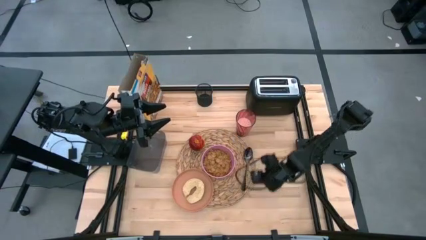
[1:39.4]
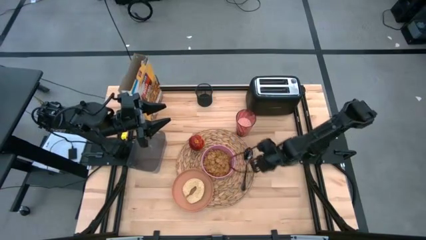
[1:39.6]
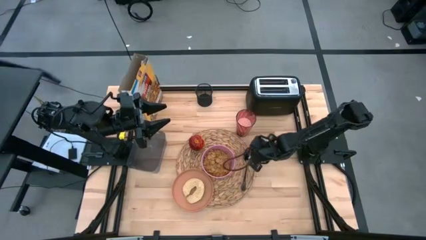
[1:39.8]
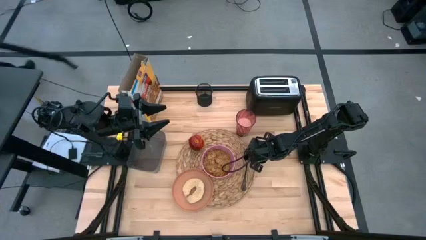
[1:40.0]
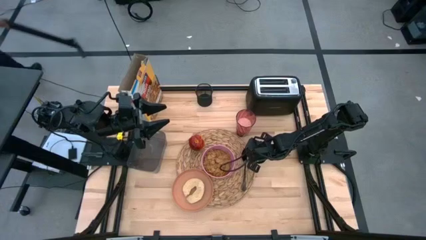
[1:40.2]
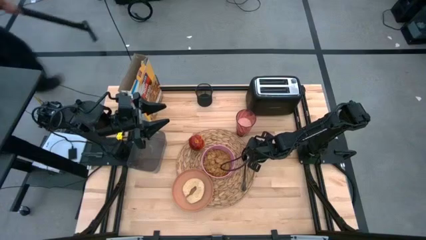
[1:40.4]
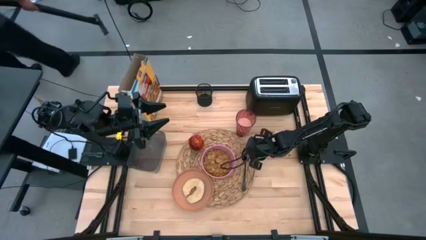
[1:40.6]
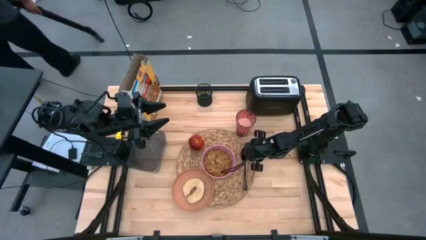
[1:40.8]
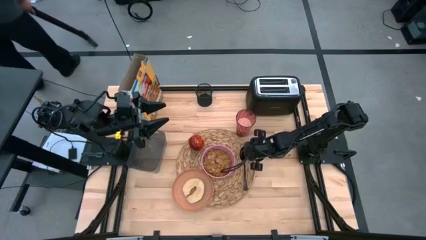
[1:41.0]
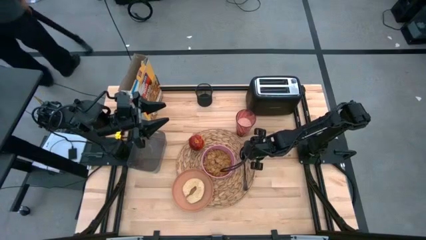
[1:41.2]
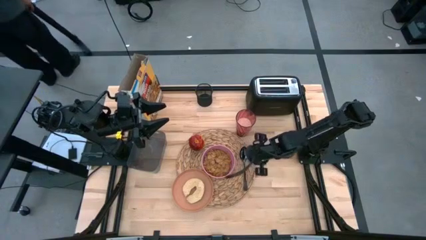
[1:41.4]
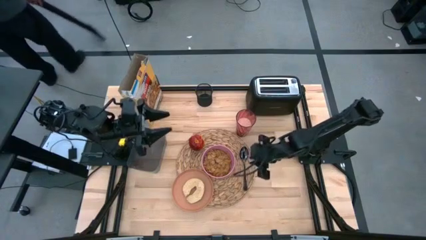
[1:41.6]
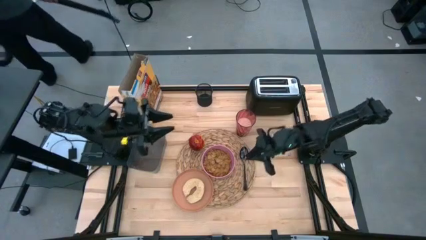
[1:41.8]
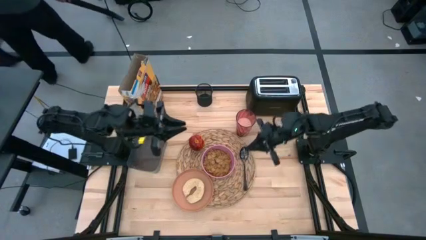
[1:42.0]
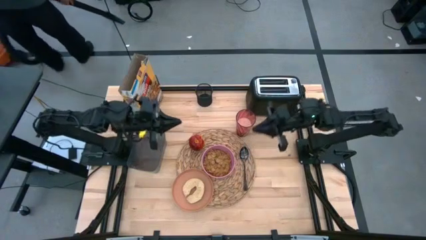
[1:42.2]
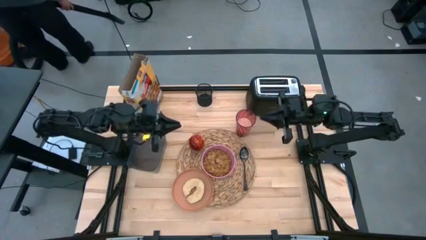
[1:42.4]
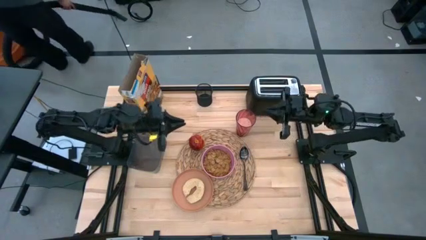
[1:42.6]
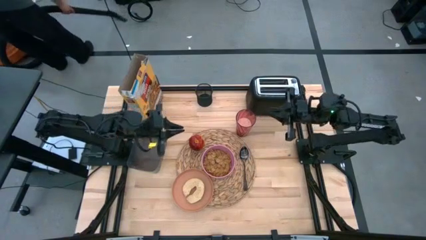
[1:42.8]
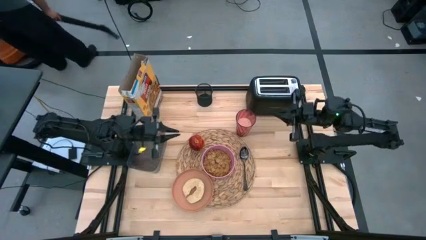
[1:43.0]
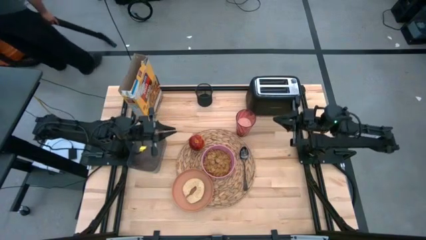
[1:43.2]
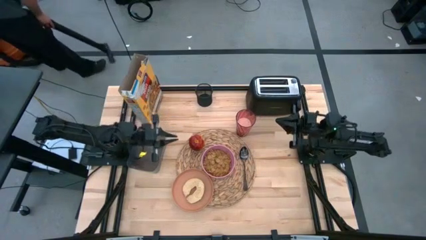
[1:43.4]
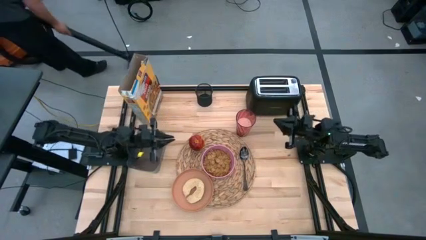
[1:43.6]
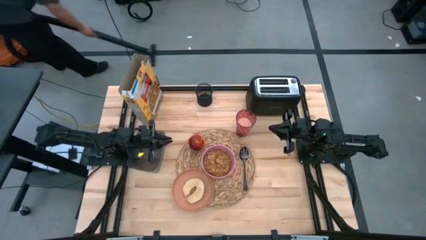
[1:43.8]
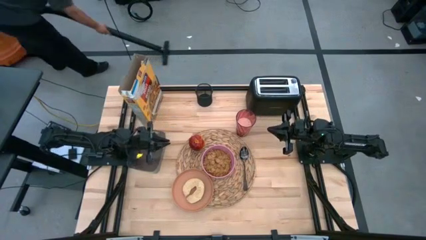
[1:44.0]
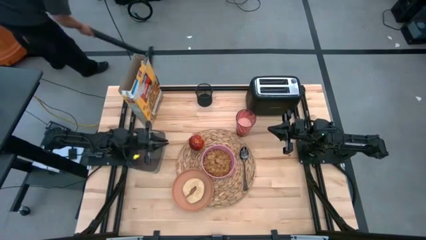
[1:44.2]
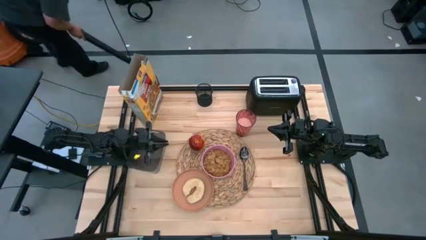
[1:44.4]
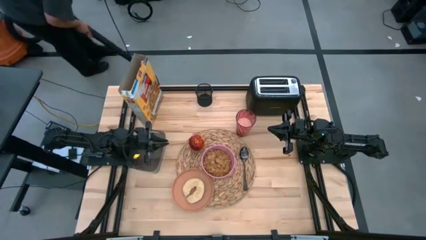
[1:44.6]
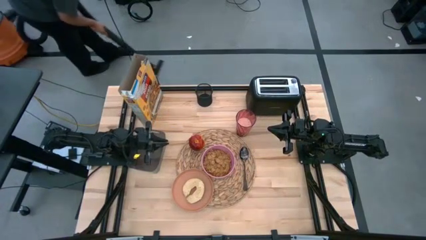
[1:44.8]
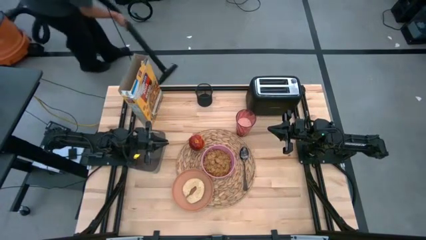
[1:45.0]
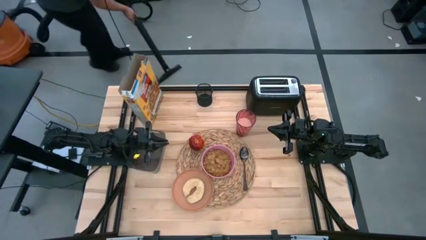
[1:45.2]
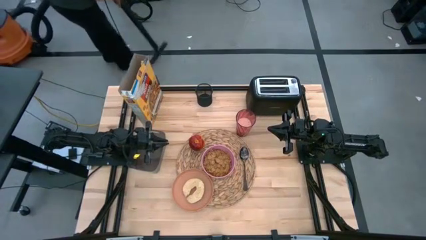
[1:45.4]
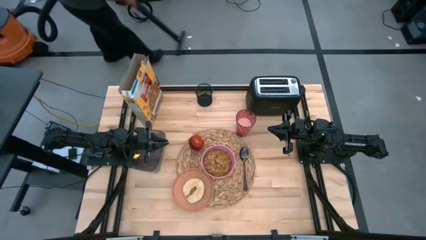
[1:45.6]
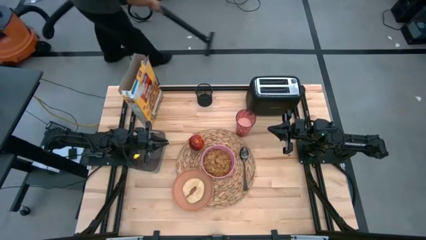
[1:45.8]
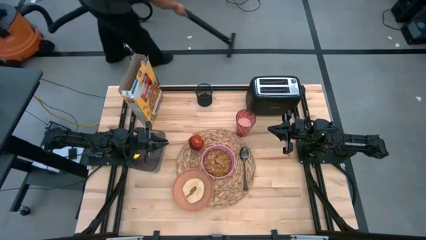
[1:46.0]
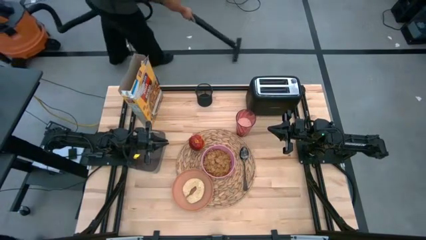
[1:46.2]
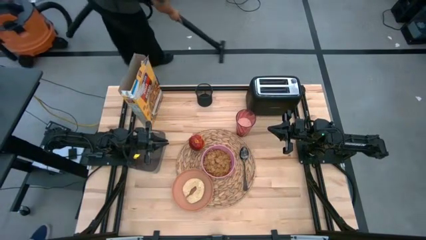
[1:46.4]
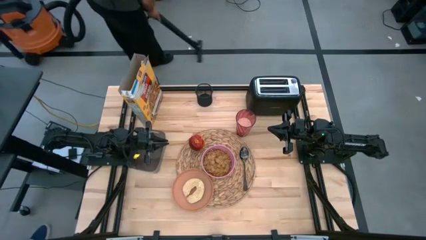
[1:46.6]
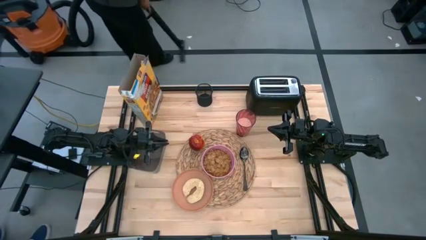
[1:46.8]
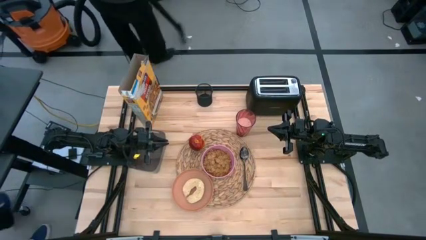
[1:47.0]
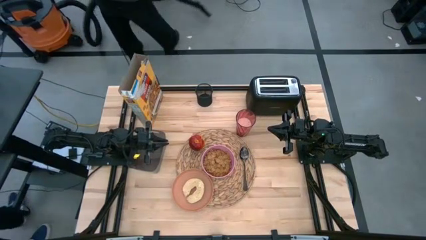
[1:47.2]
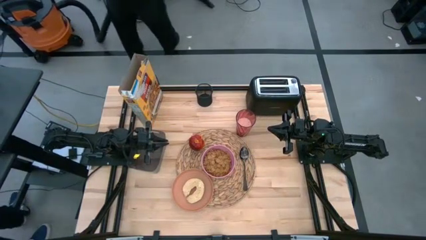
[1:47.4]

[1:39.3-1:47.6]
Task: Arrange a breakfast setting
Return to Home Position

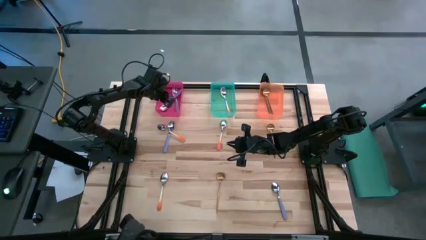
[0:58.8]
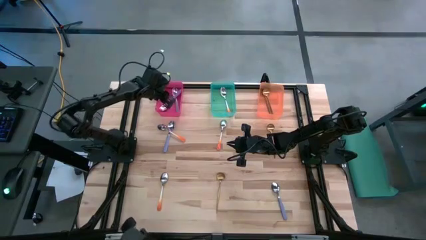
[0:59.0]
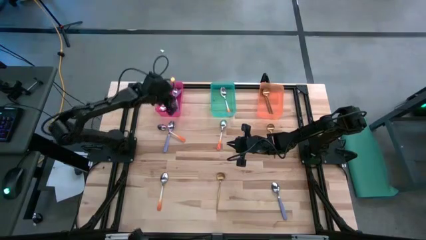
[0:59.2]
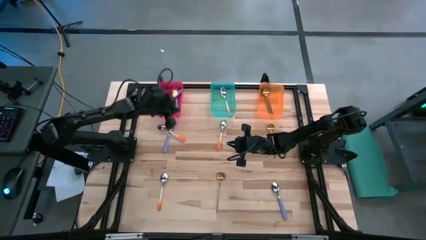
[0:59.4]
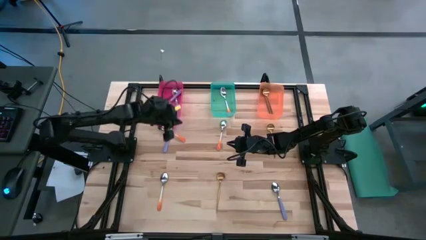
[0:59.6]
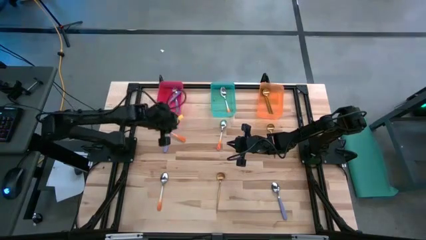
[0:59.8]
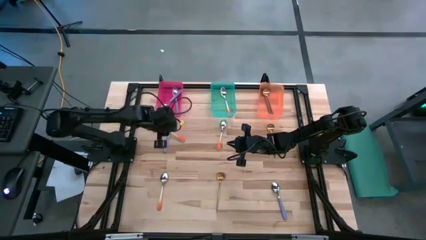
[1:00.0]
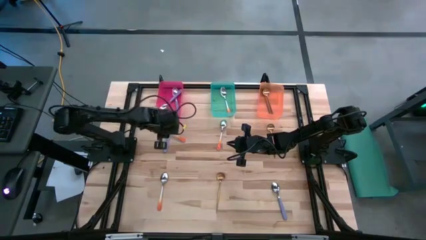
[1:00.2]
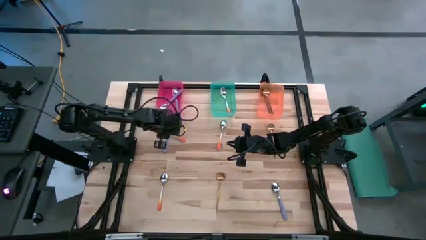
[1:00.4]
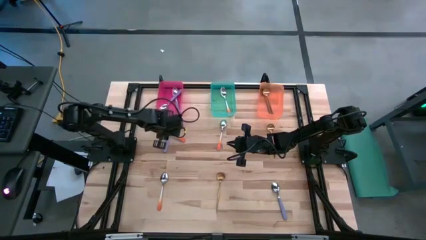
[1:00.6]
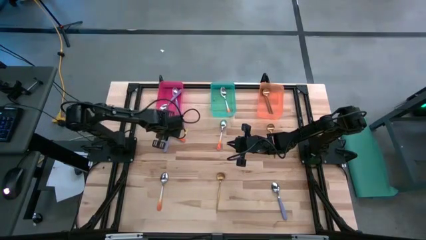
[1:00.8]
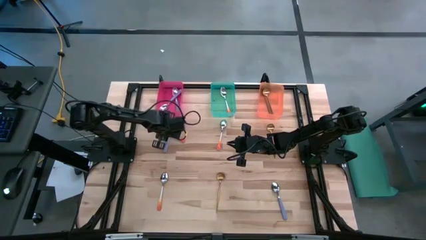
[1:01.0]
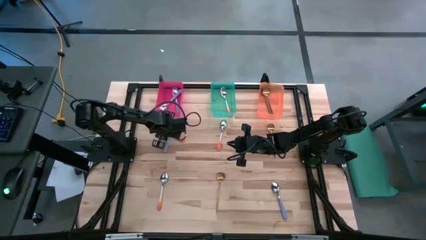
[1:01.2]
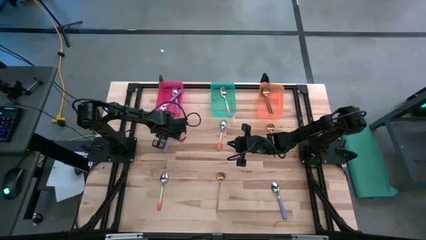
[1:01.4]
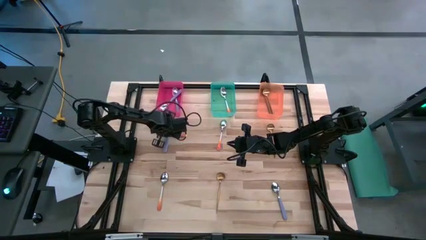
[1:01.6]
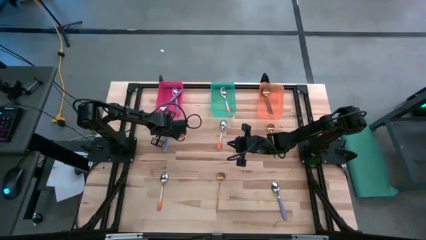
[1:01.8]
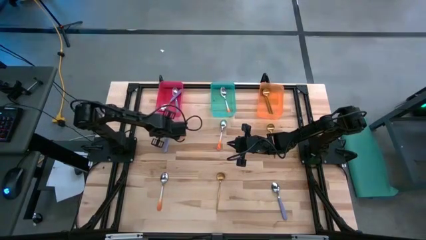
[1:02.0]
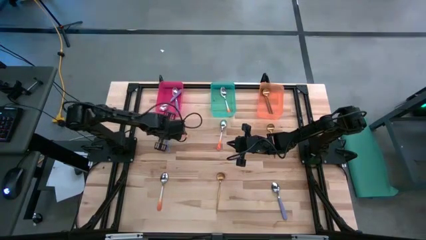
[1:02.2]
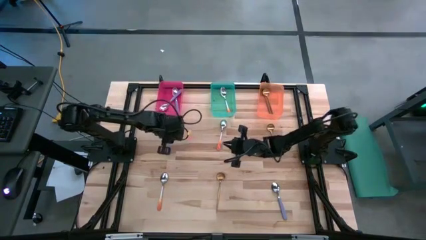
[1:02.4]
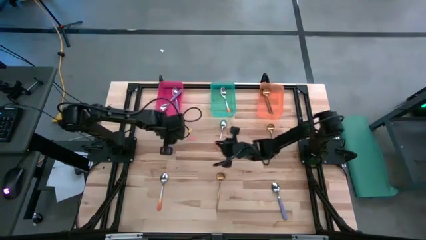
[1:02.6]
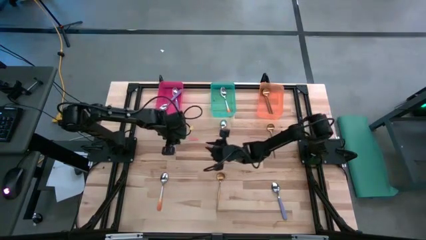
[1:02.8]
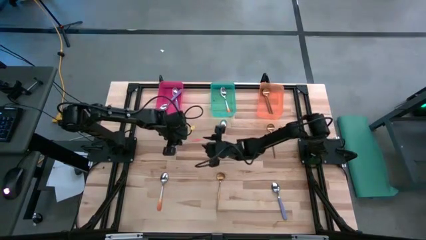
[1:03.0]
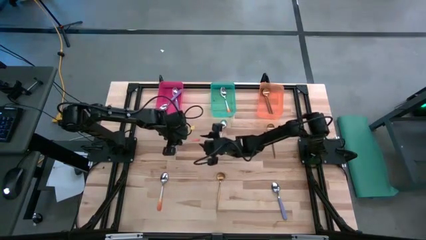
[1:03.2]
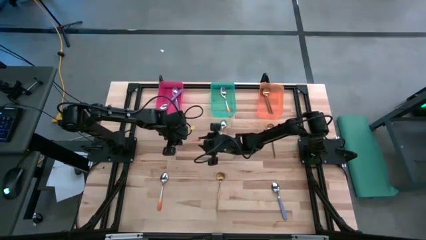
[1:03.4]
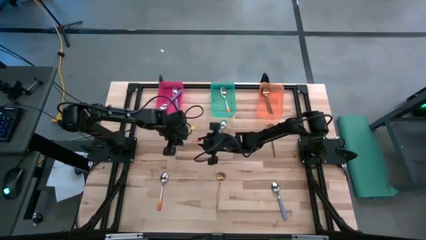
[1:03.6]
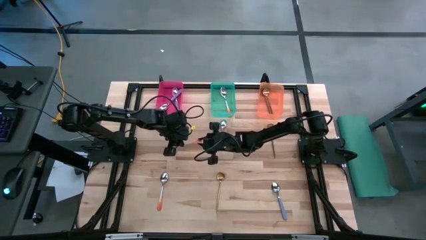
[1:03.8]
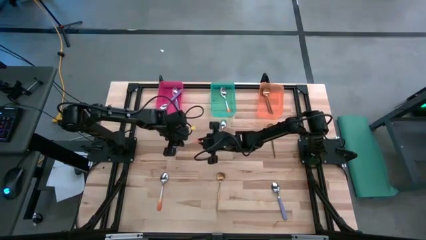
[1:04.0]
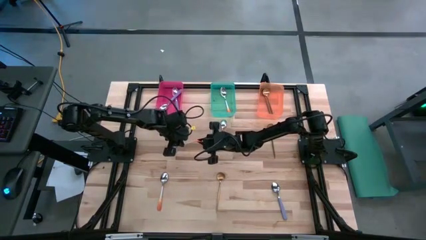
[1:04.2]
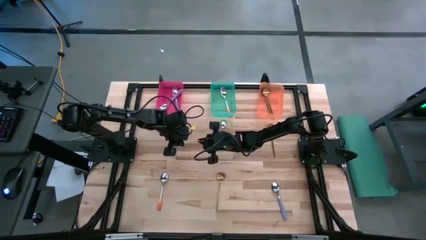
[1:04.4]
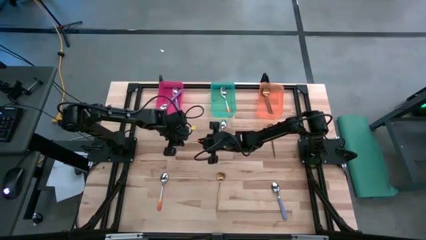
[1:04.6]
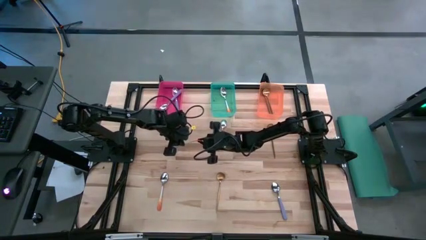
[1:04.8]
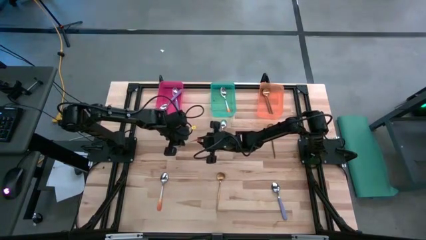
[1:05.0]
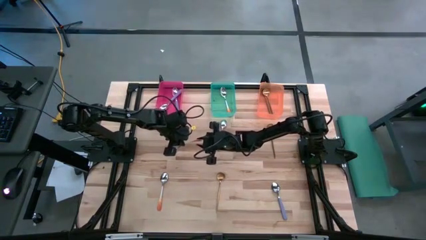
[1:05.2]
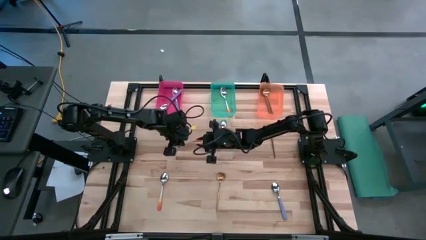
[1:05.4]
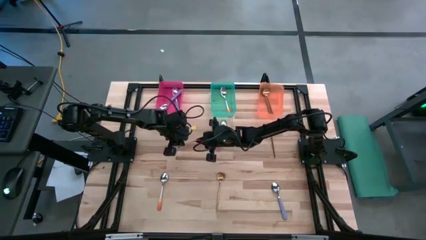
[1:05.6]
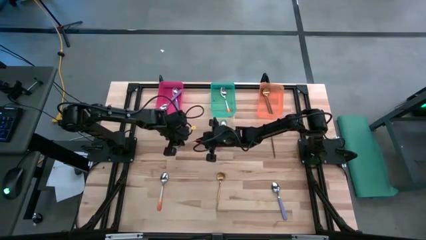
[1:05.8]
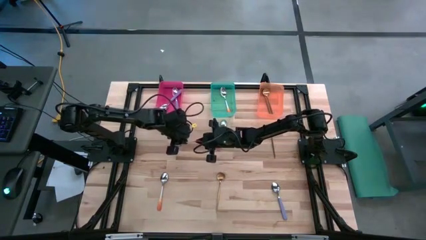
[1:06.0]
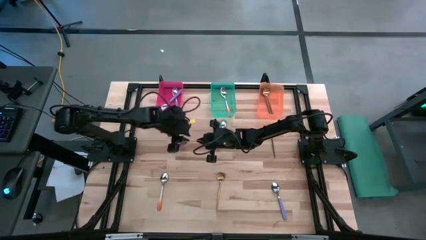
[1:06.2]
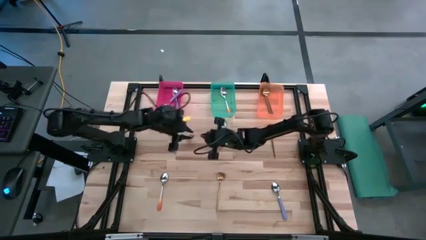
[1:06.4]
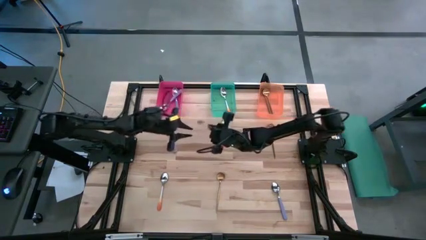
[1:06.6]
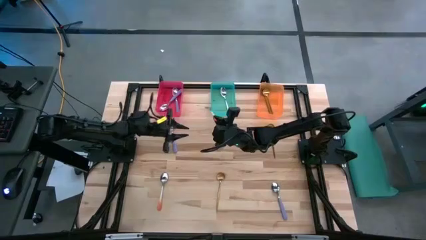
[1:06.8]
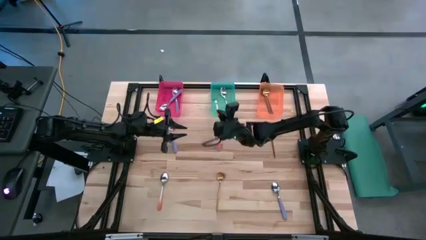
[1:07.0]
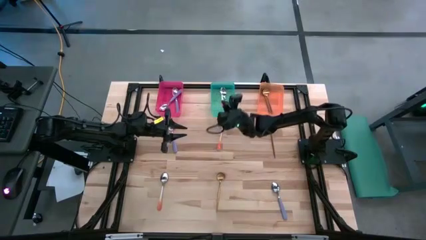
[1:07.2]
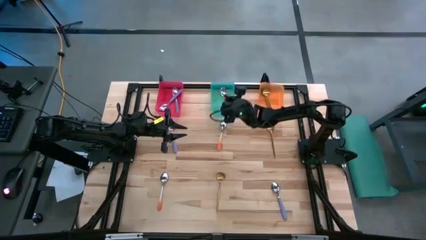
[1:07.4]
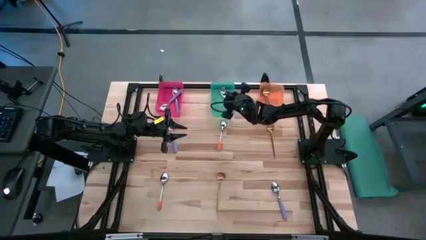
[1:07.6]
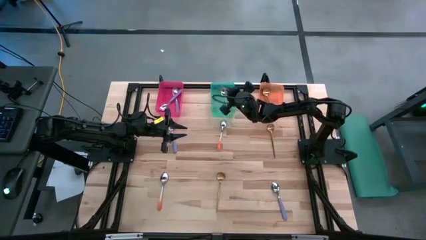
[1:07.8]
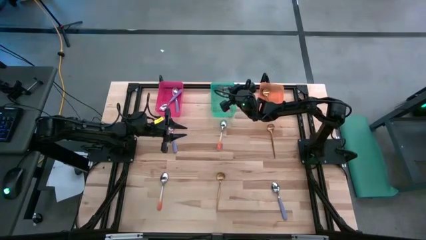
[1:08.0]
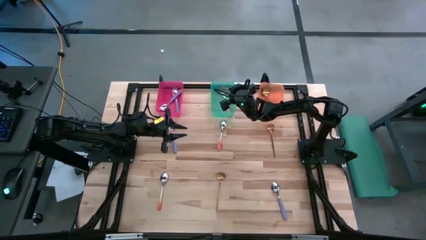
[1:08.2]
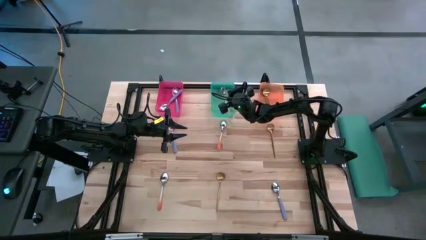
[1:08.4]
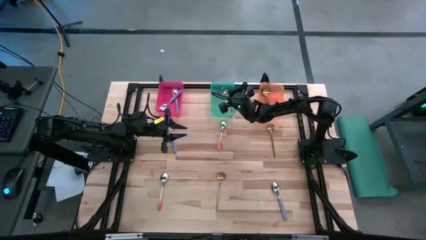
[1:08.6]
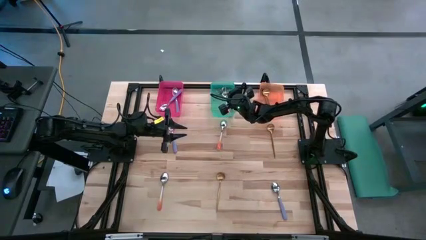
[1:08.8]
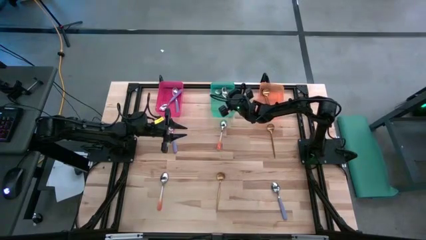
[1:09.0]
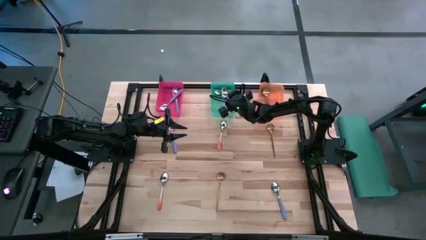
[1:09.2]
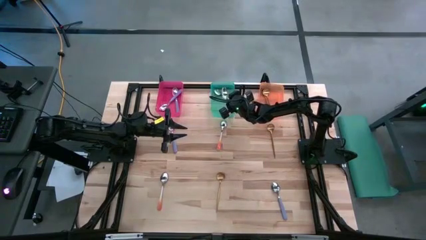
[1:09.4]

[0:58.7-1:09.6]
Task: Sort silverware by color (type)
Put the orange spoon into the green bin
